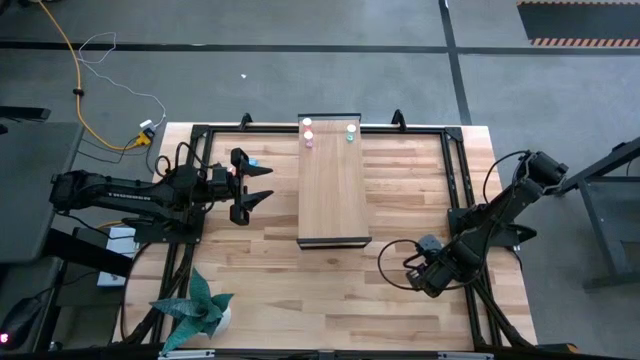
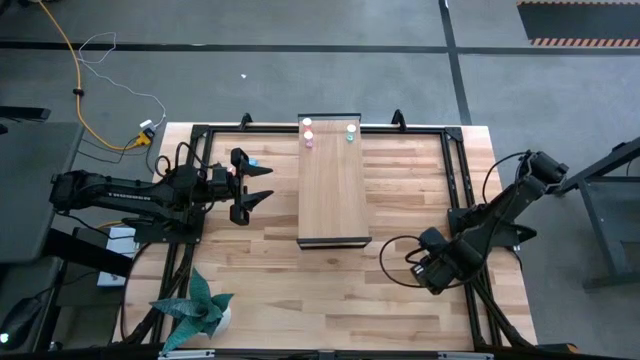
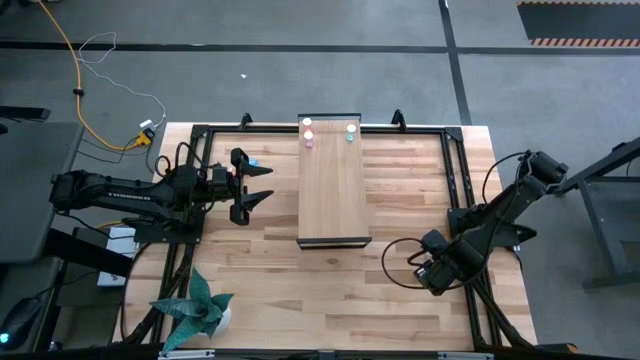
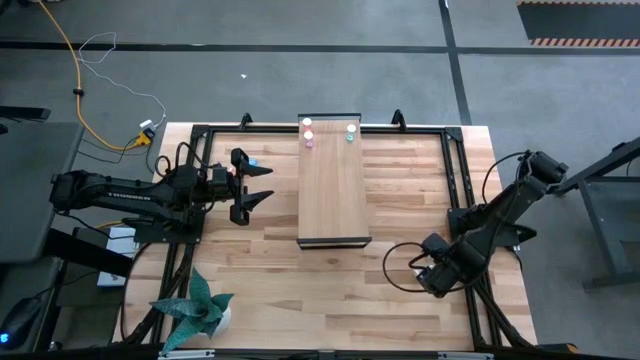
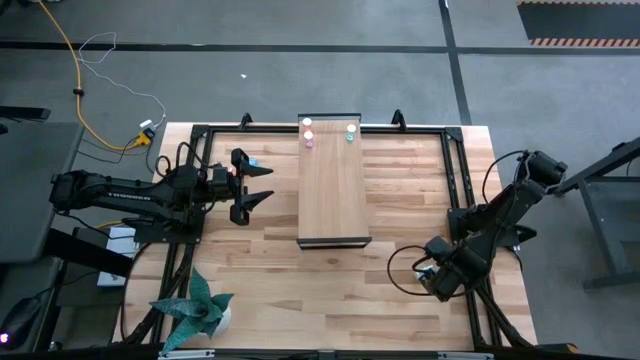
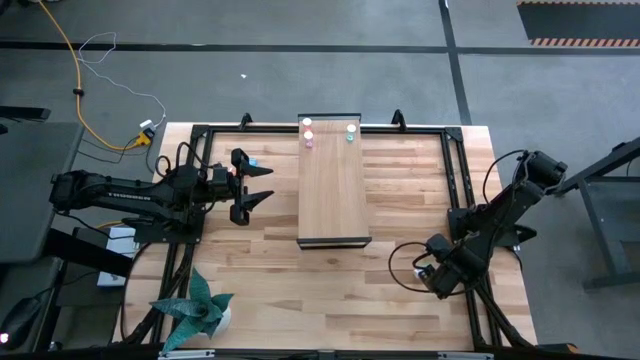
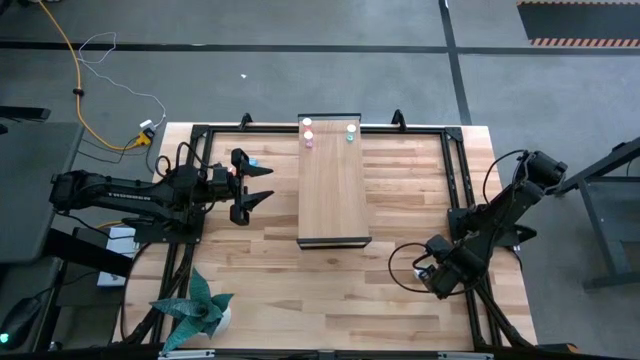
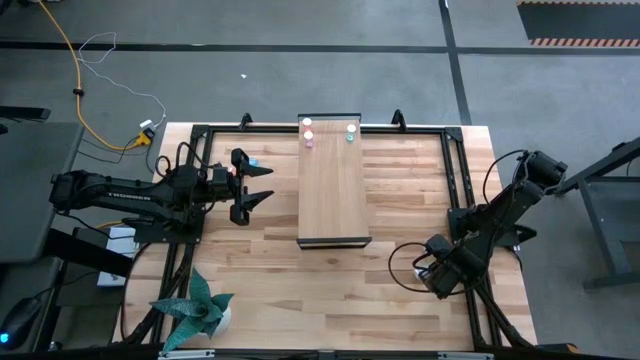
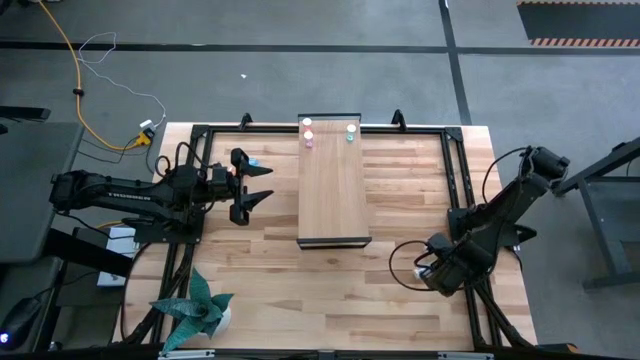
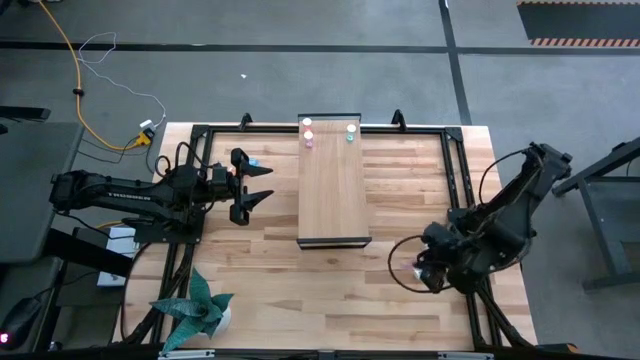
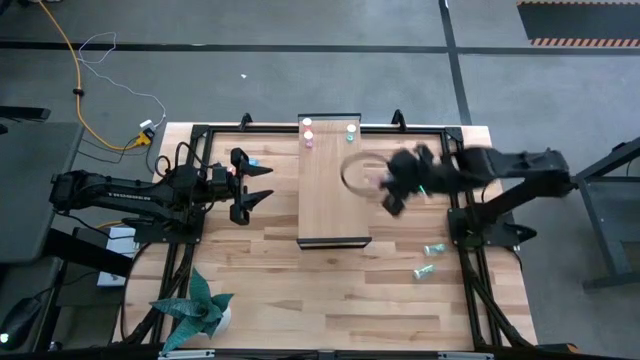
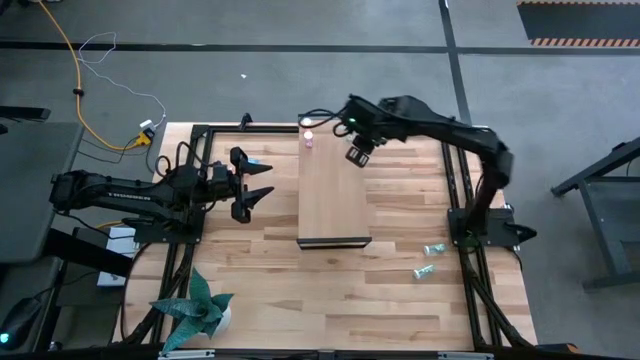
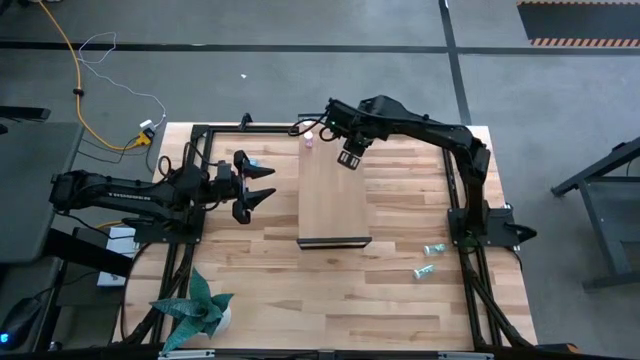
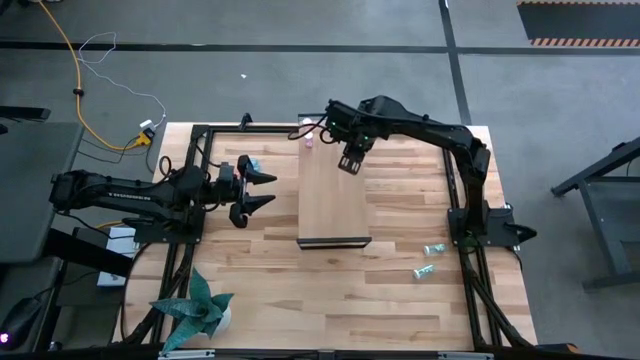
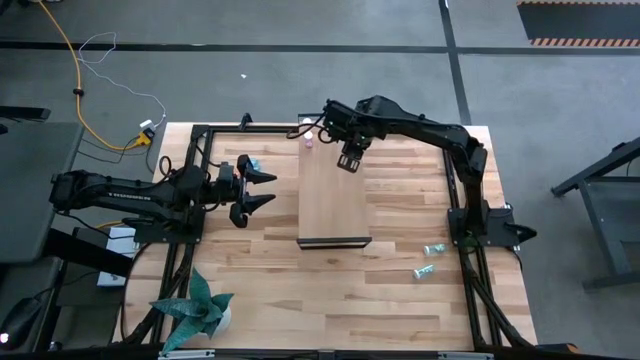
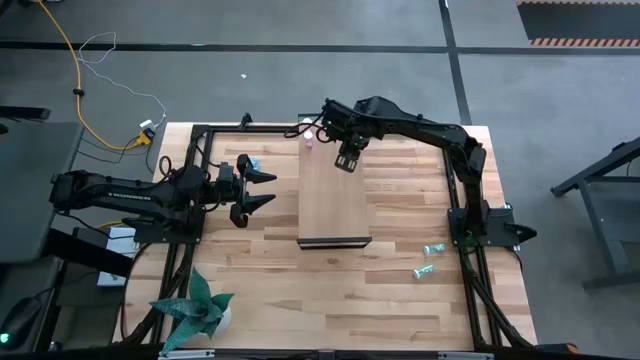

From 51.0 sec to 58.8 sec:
Task: Pick and place medicine bottles onto shelf by color
Put the transparent pink pill bottle on the shelf

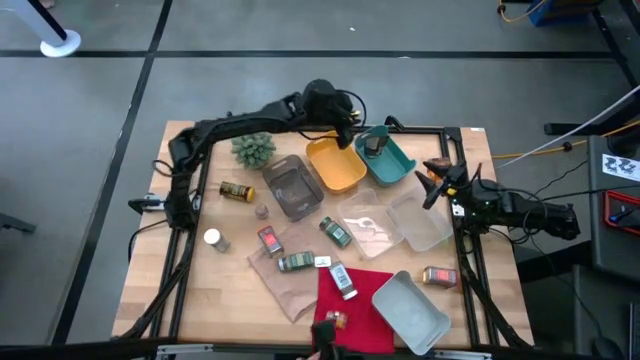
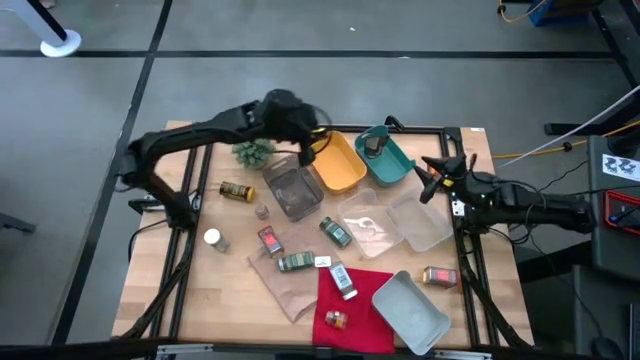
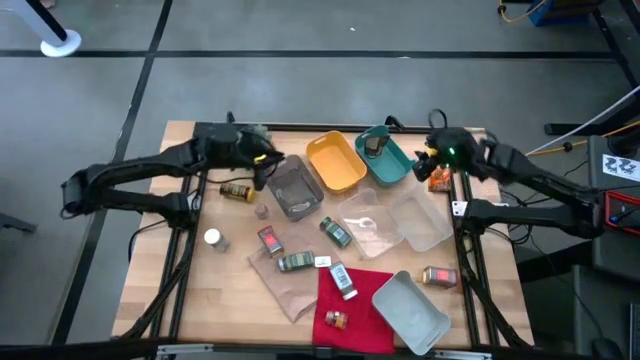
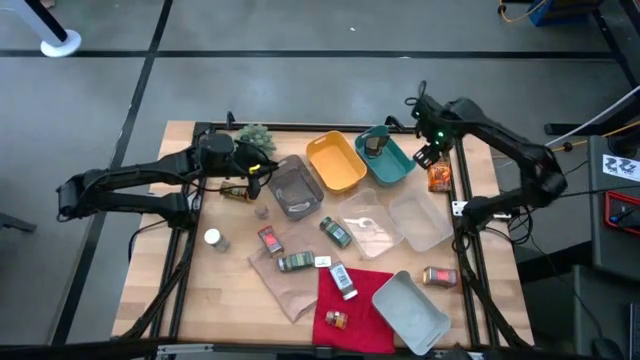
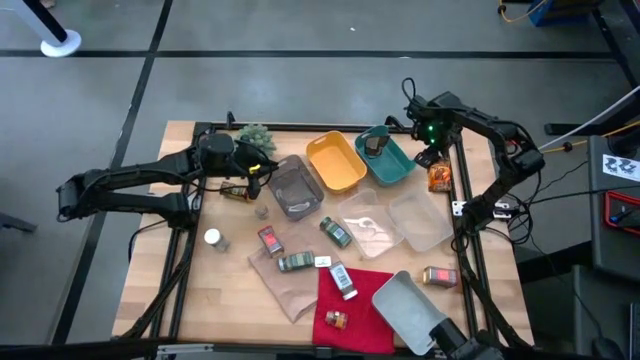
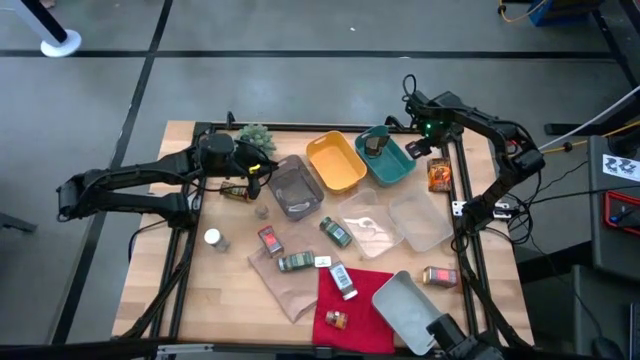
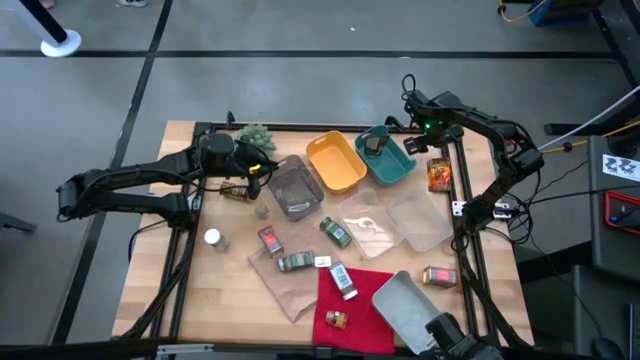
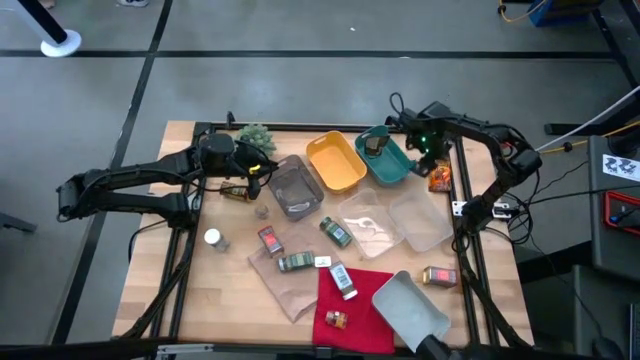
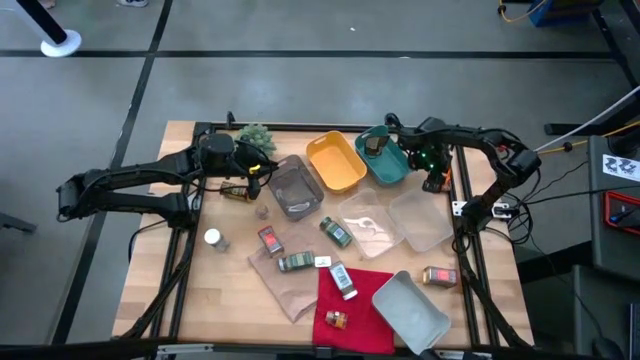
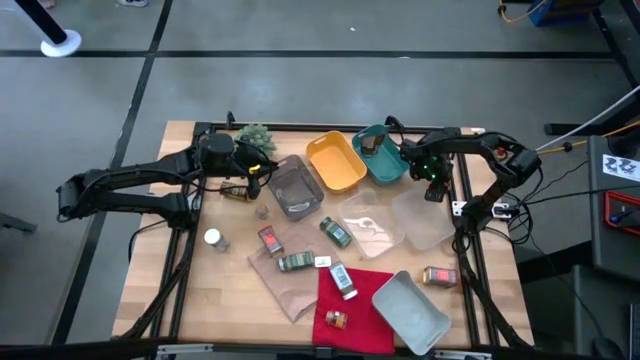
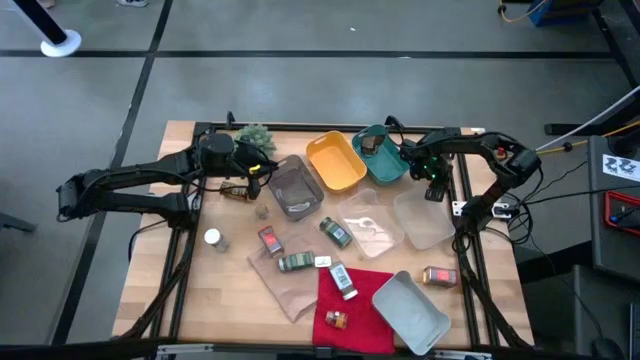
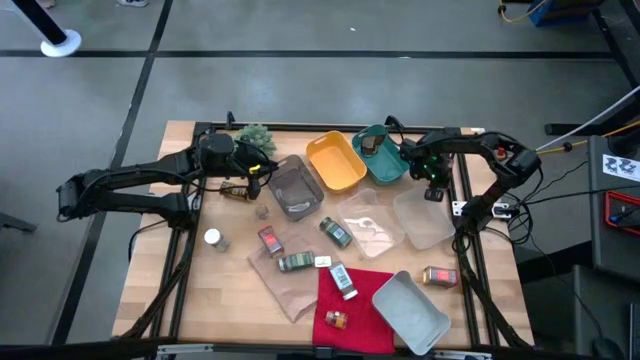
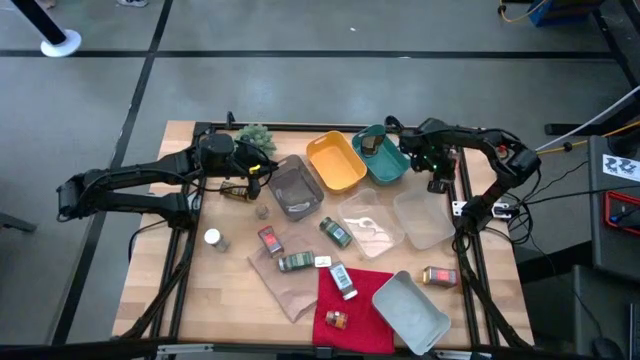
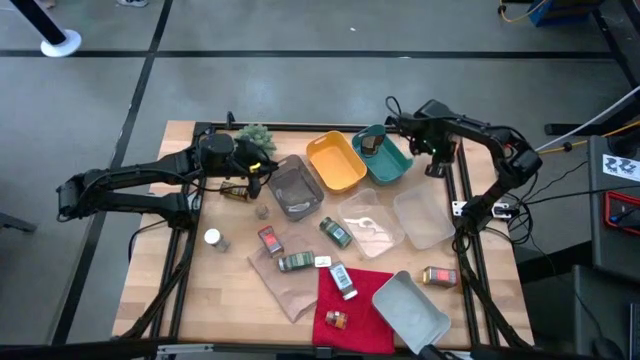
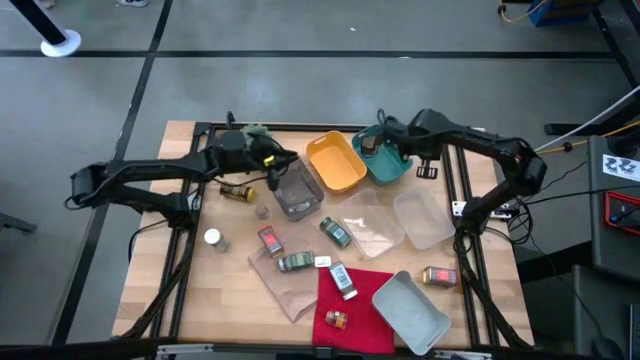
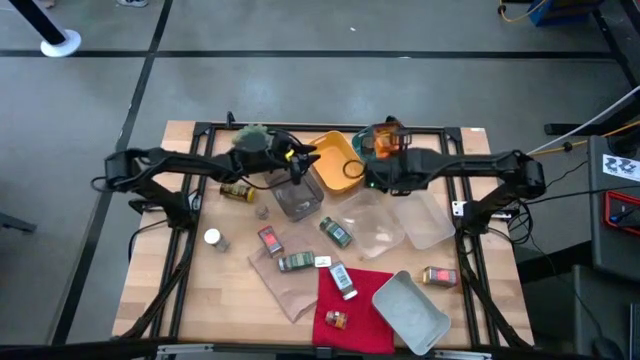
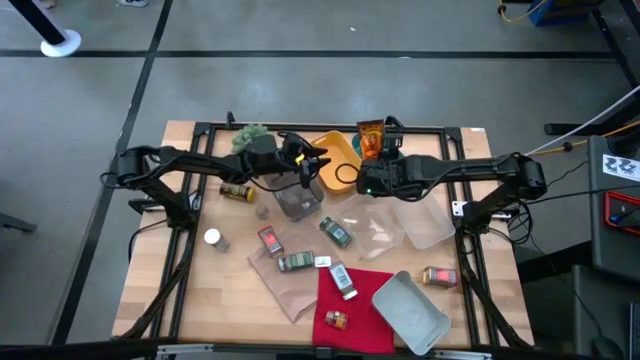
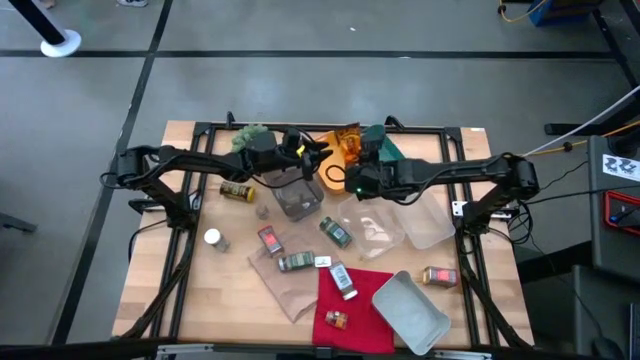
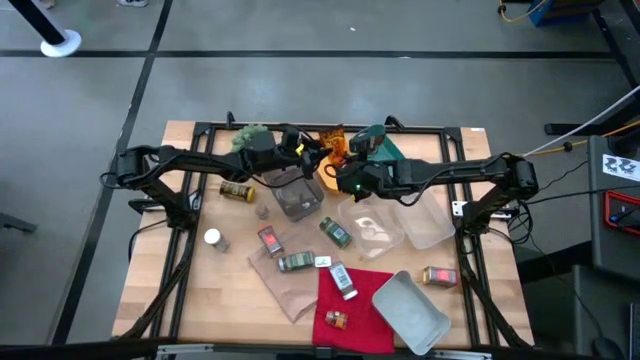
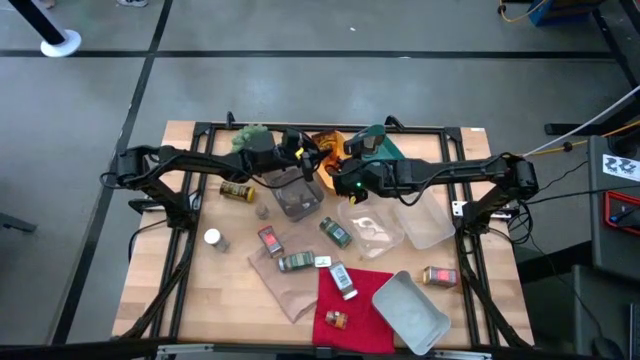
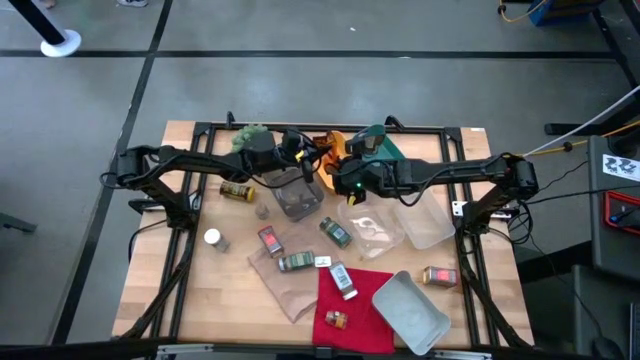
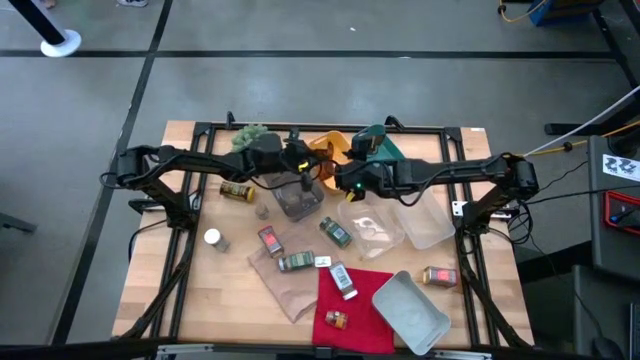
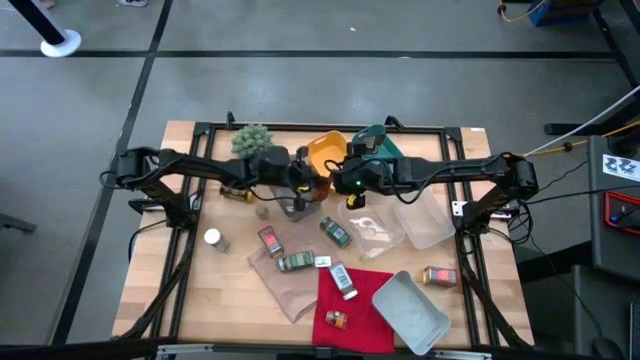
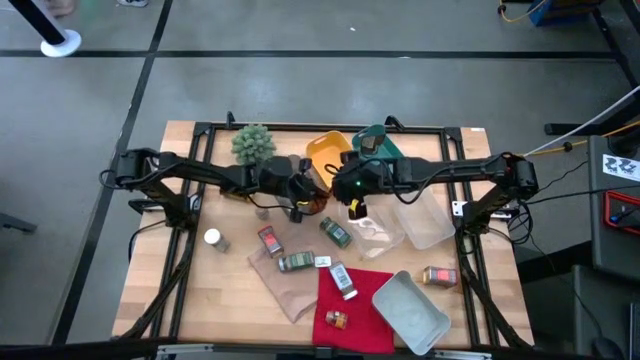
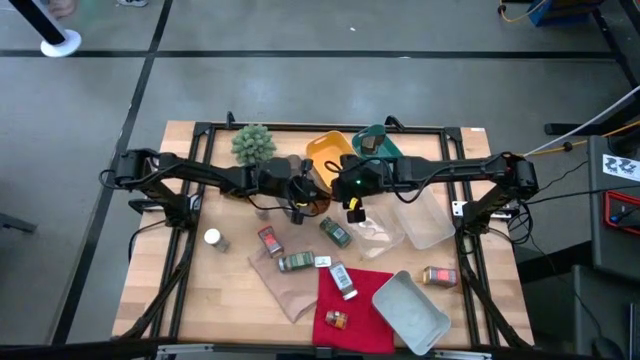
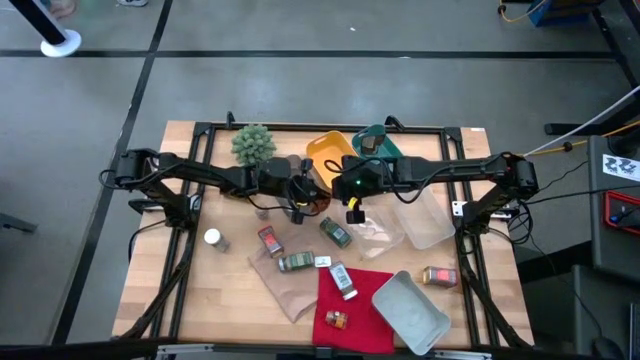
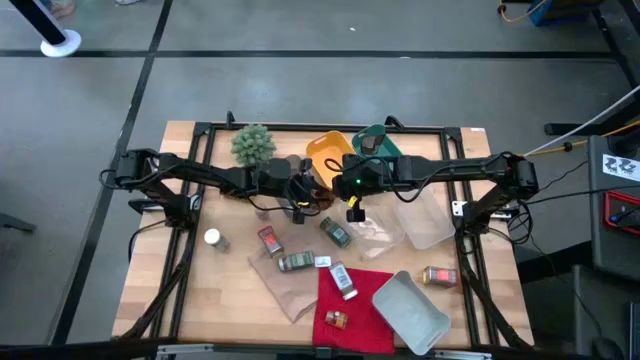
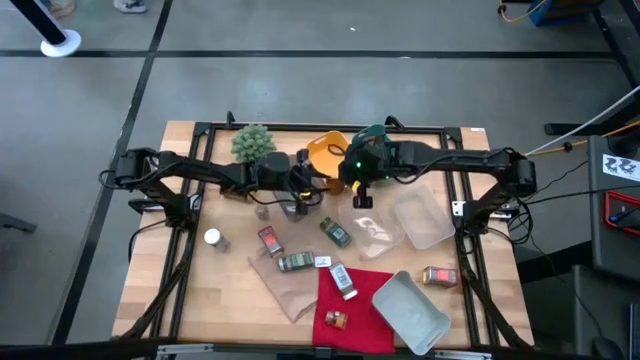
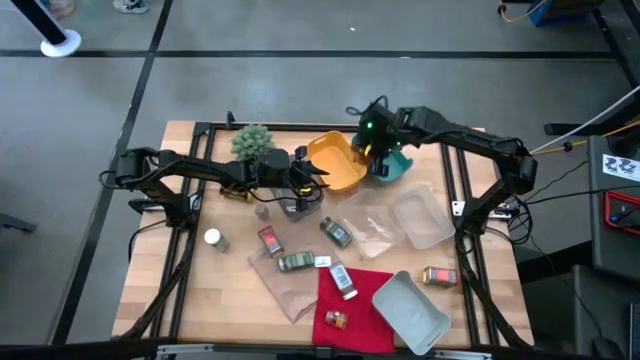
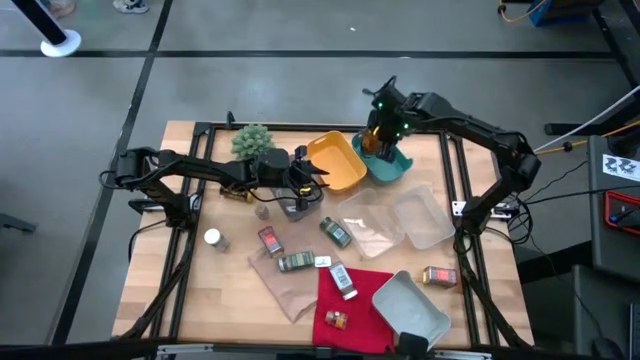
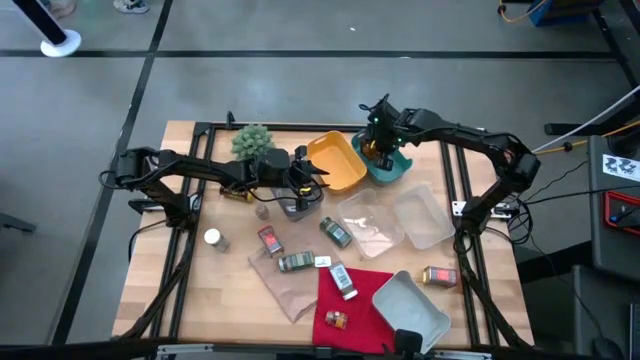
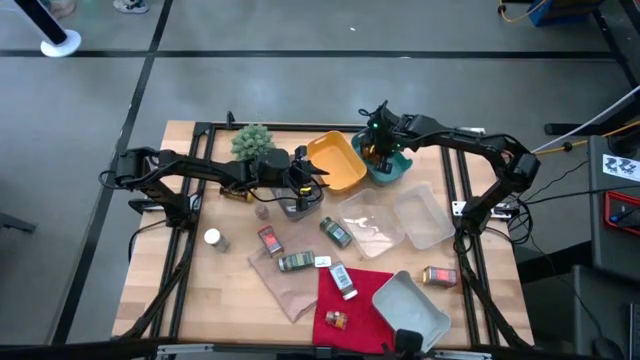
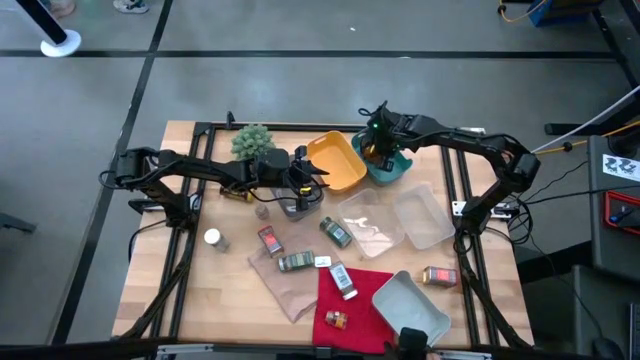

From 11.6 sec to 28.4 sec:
Task: Sort spices by type
Put the brown seasoning pack into the green bin
